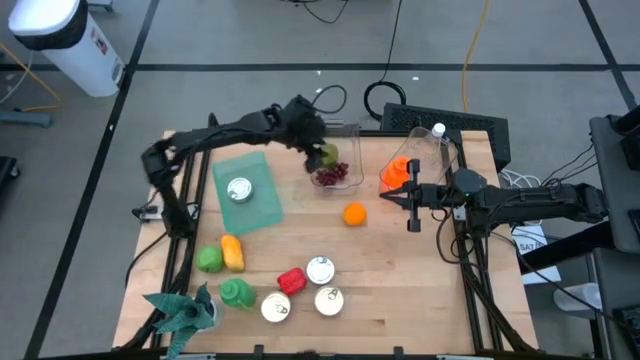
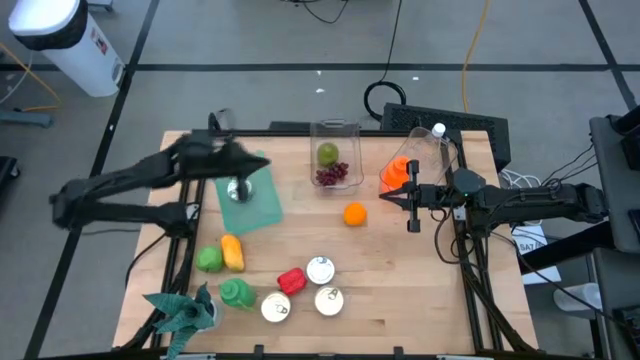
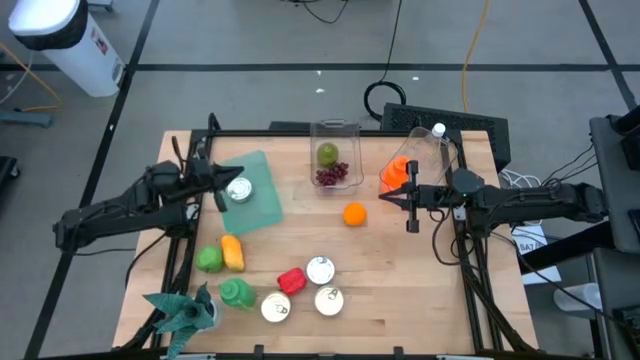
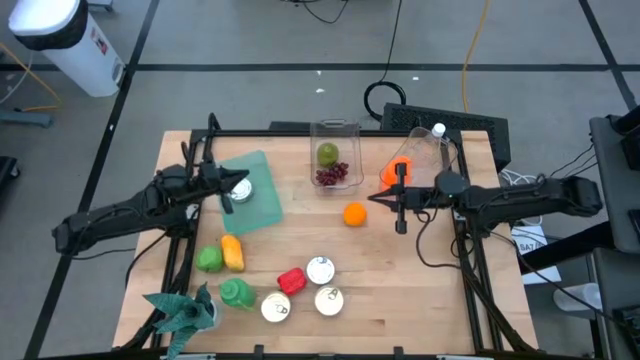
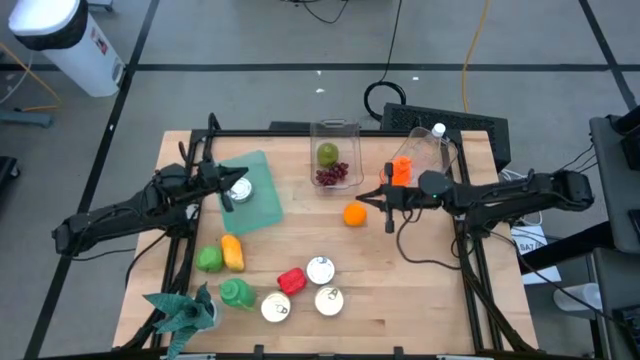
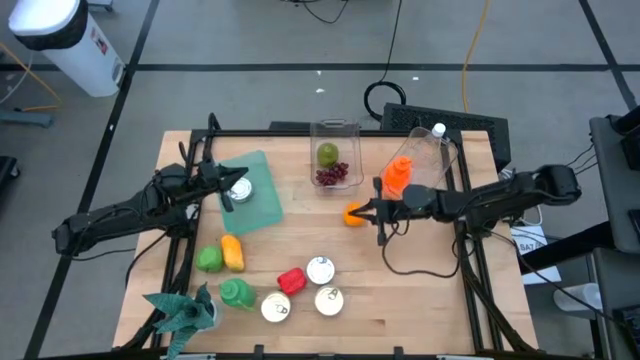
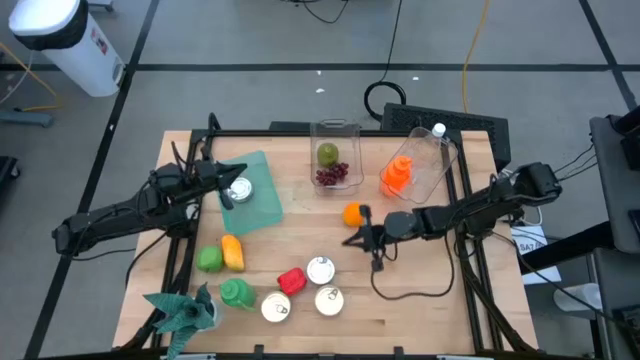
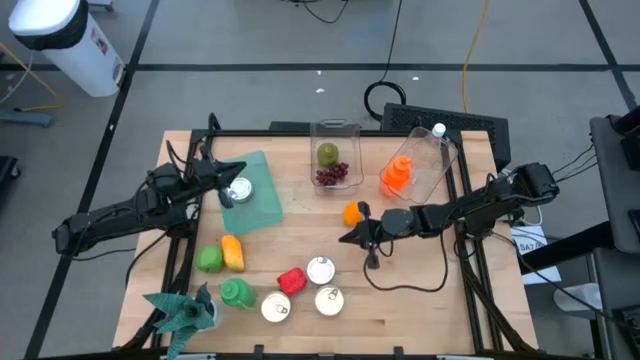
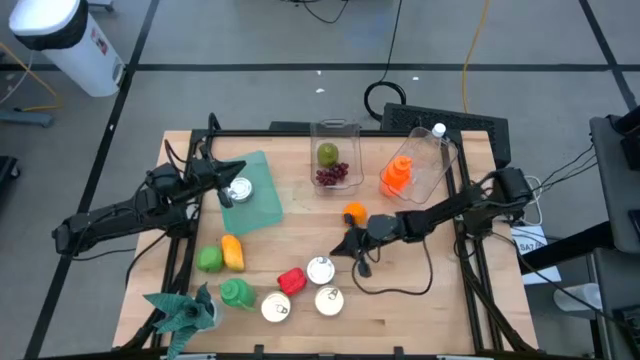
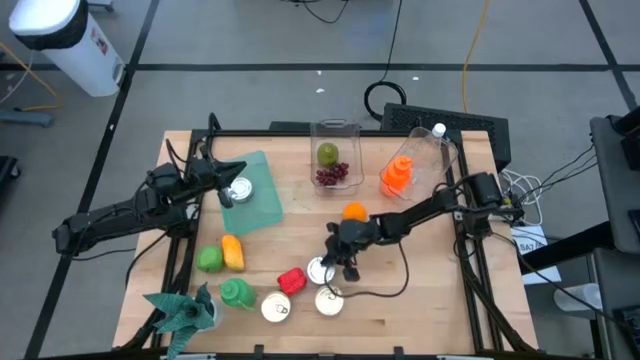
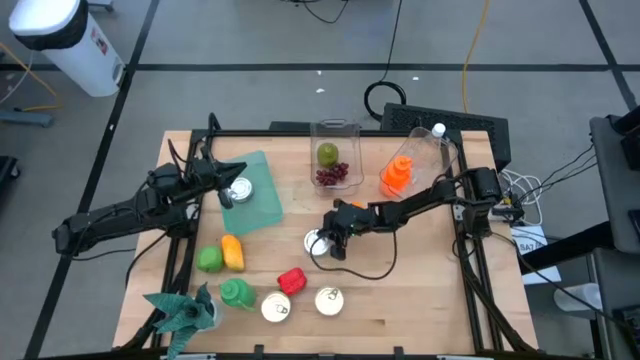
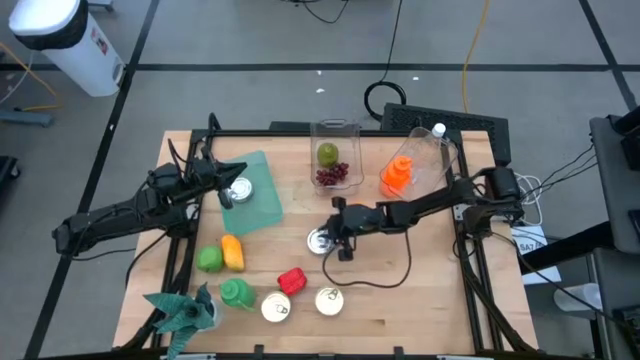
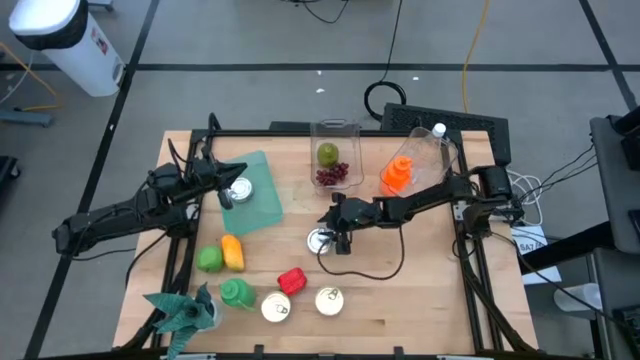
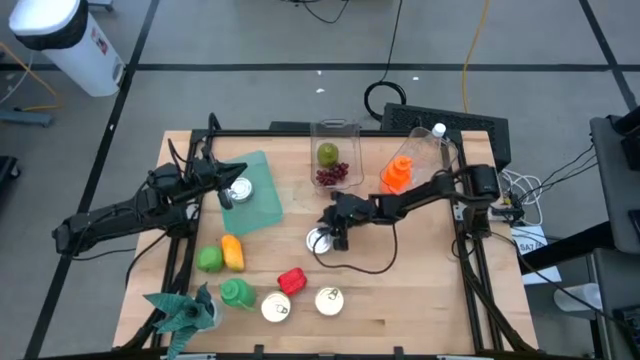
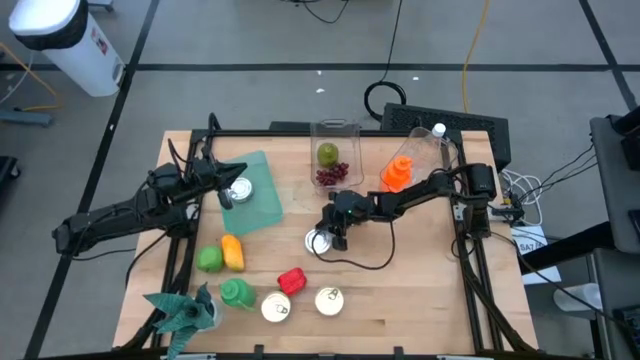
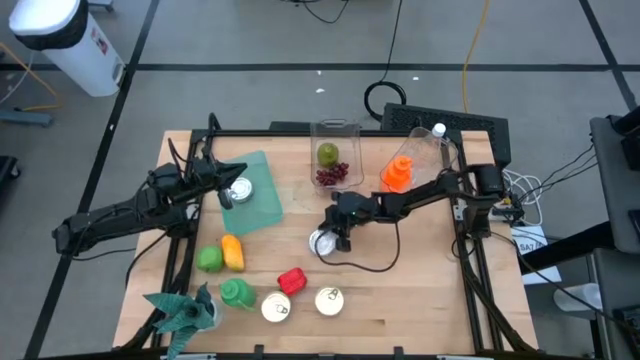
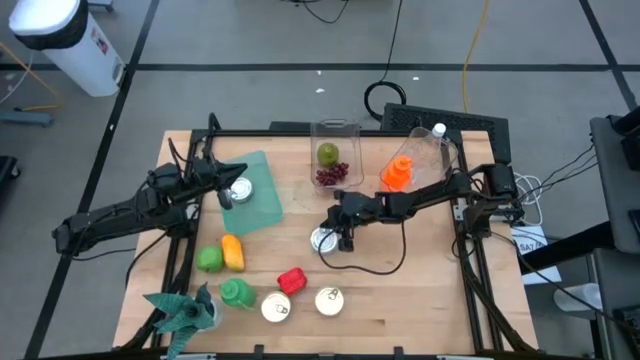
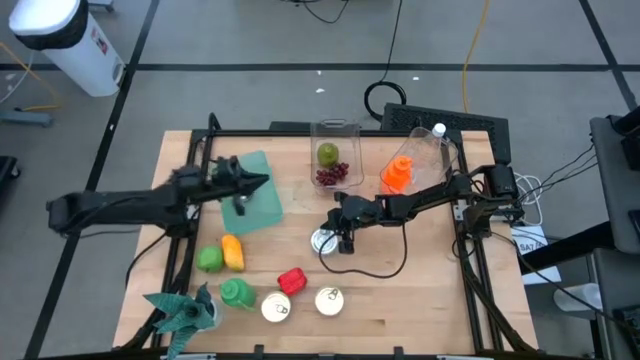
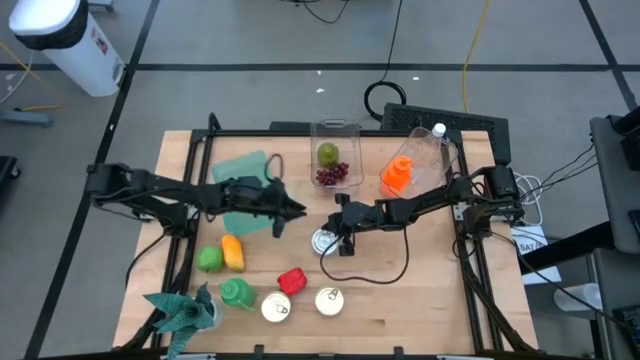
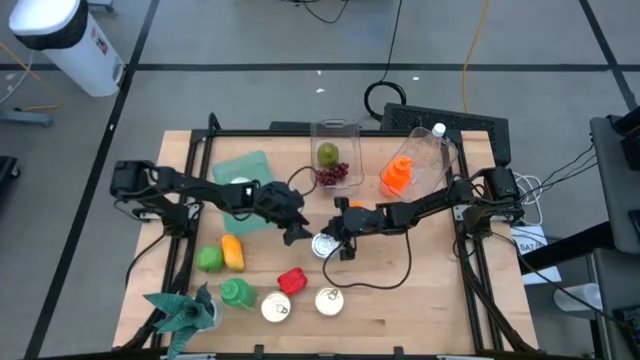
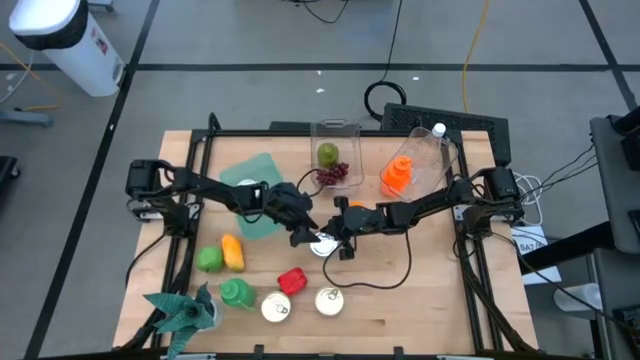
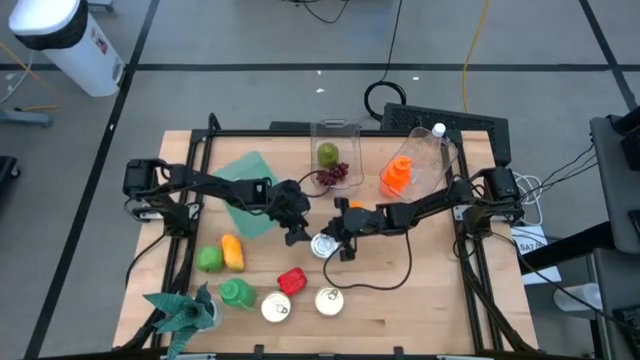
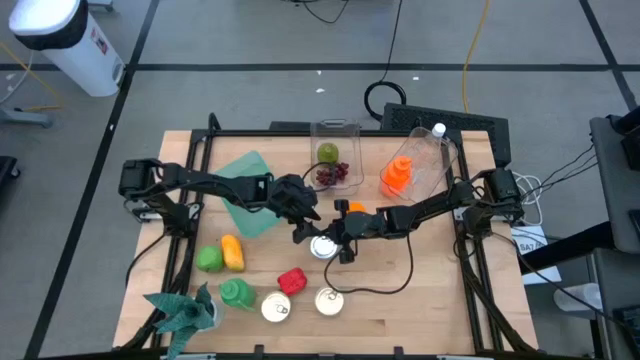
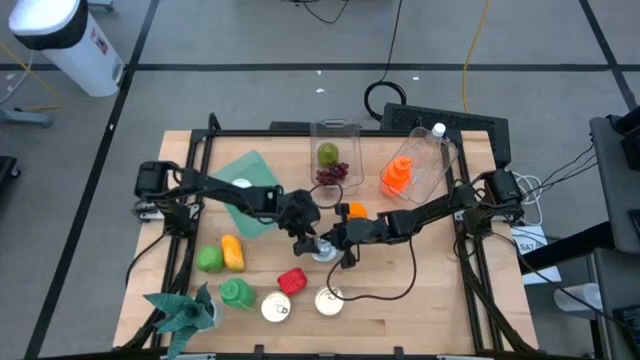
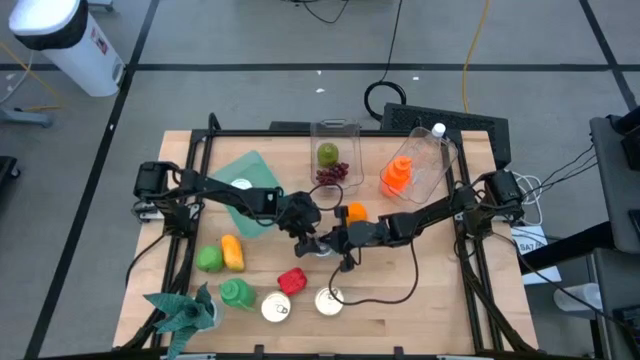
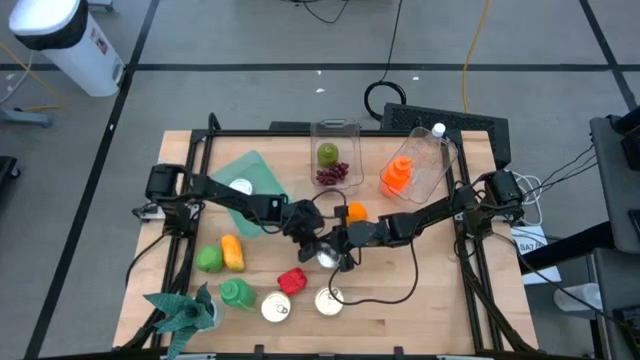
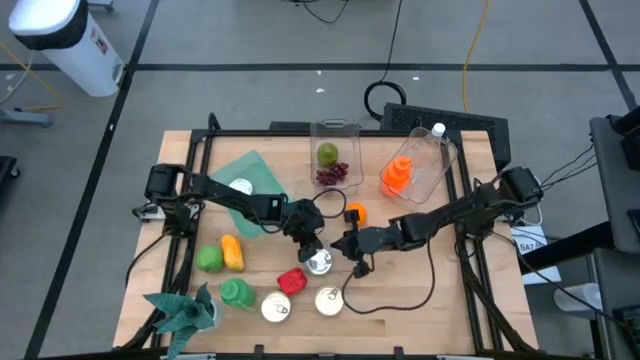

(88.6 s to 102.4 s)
Task: Pick & Place Food Item
Put the green tuna can into the green bin

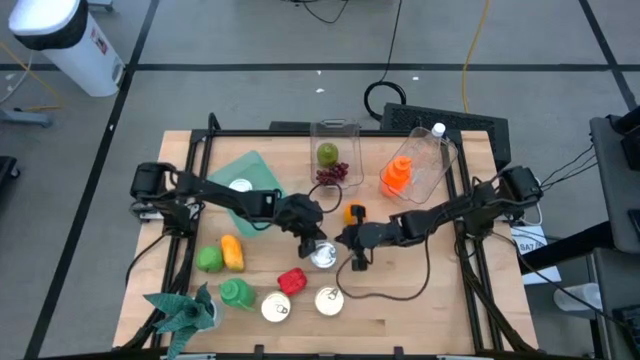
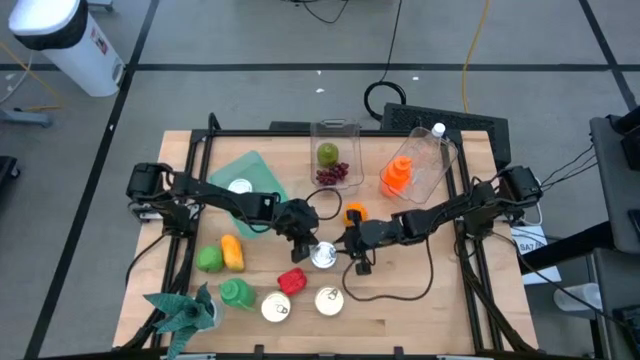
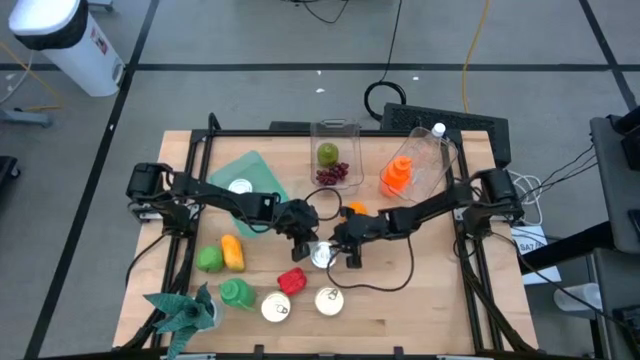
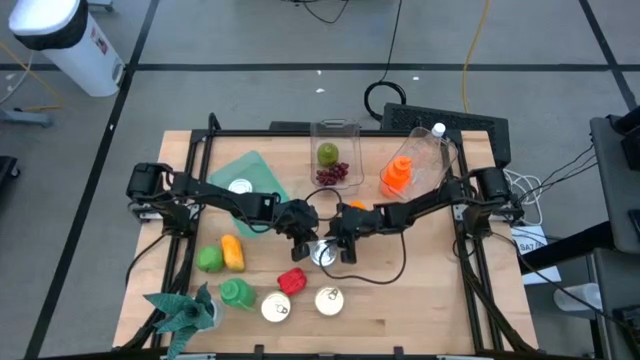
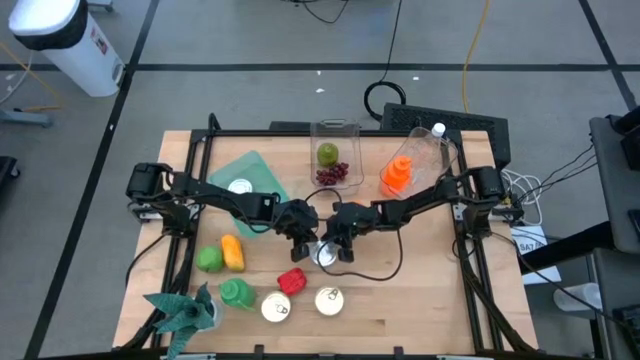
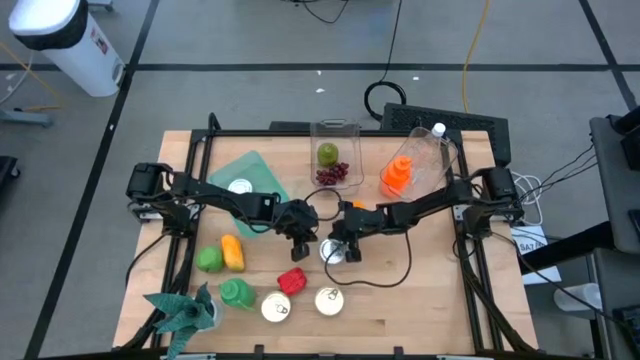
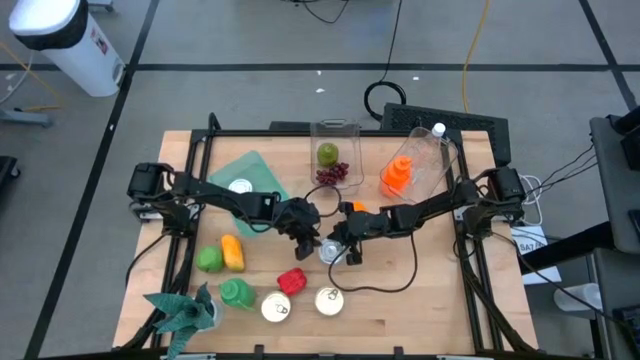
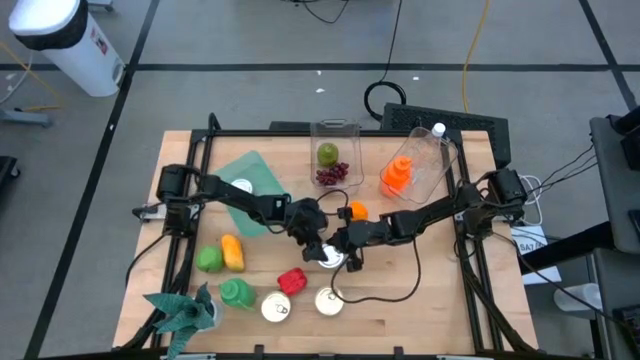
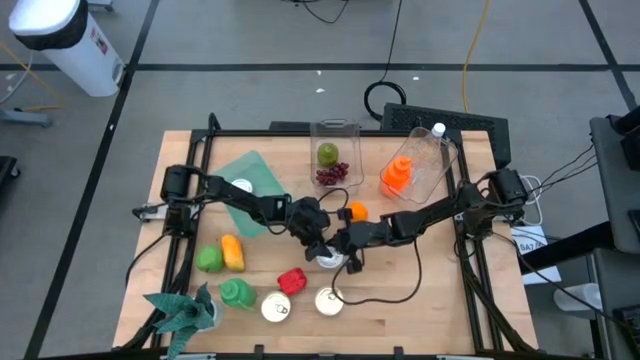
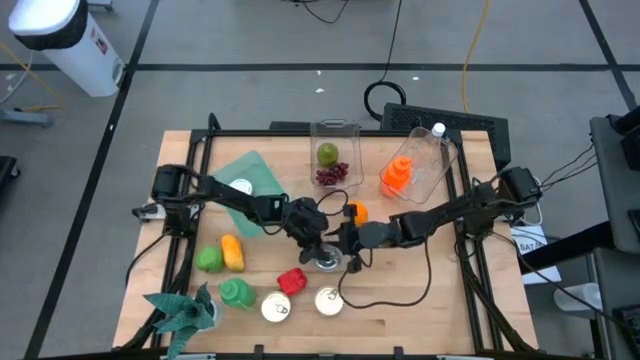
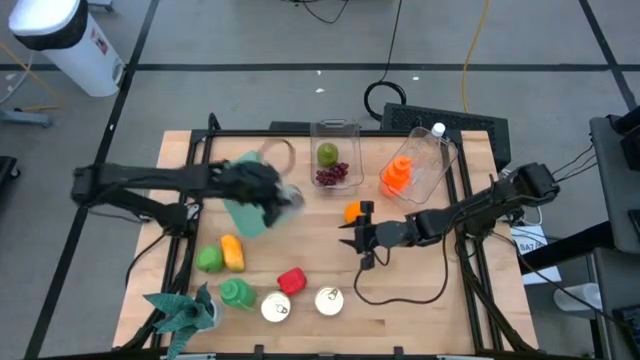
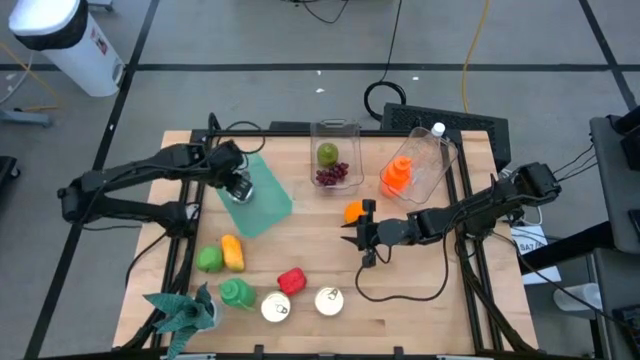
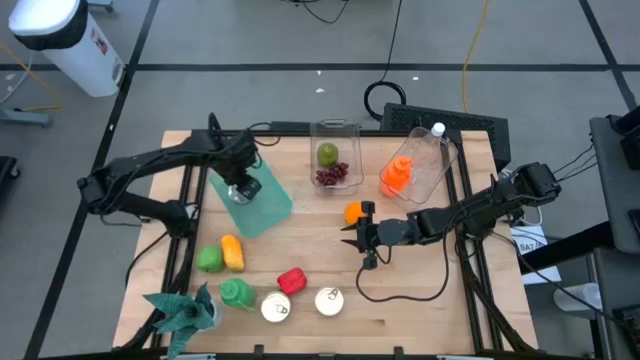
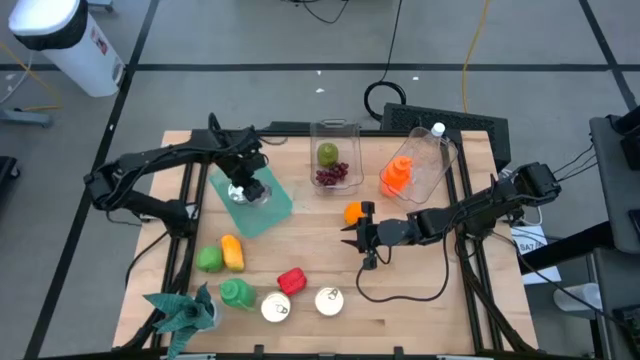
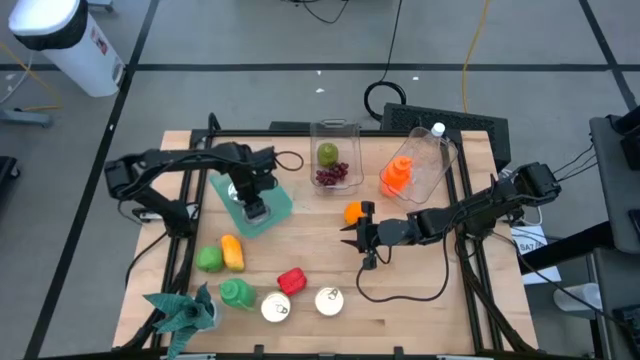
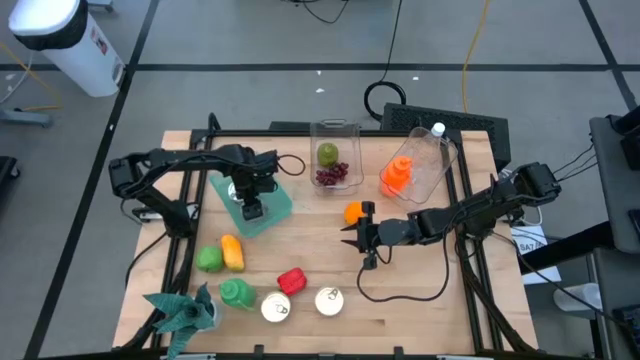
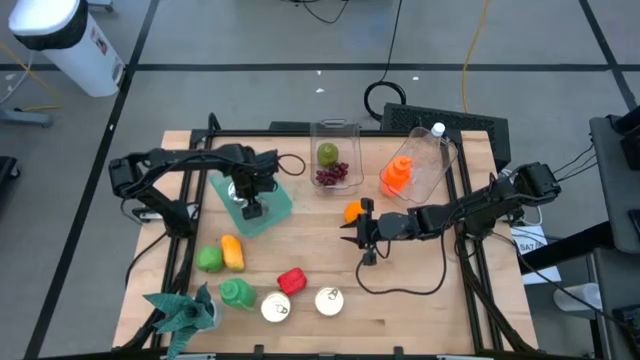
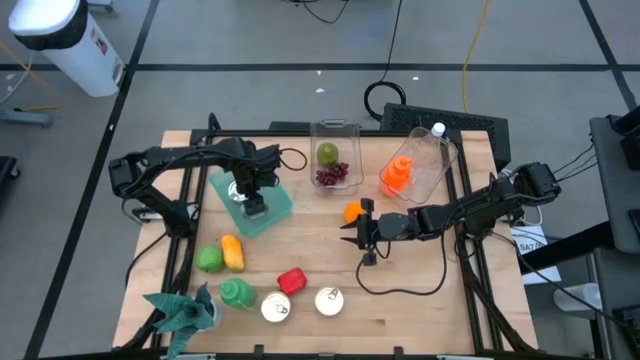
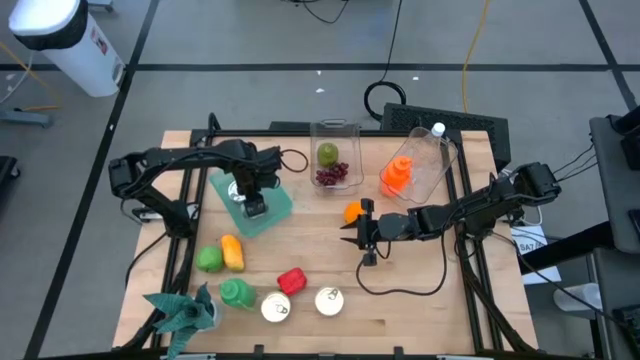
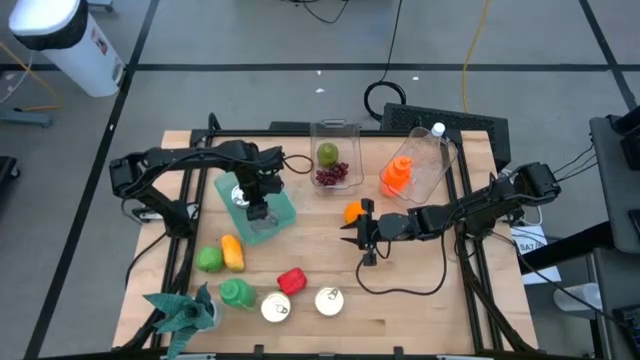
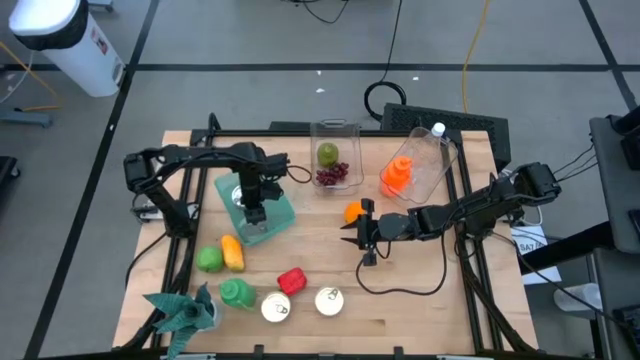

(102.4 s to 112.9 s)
Put the green tuna can into the green bin
